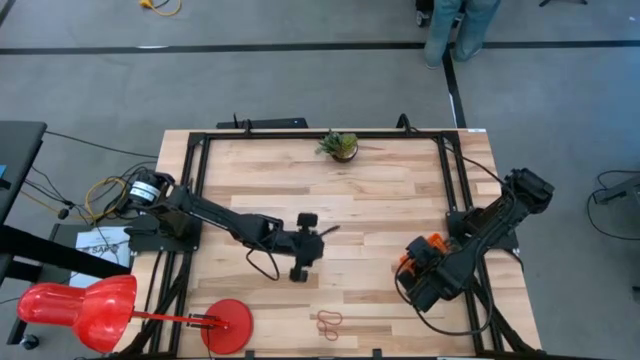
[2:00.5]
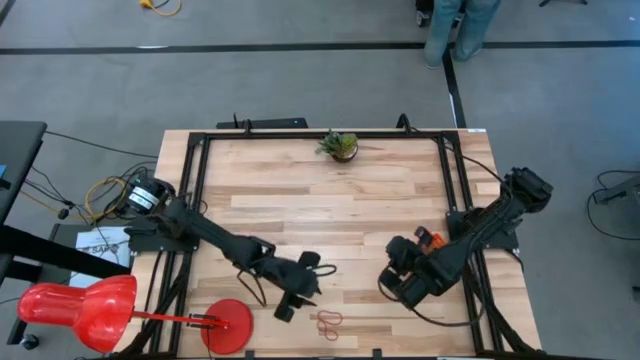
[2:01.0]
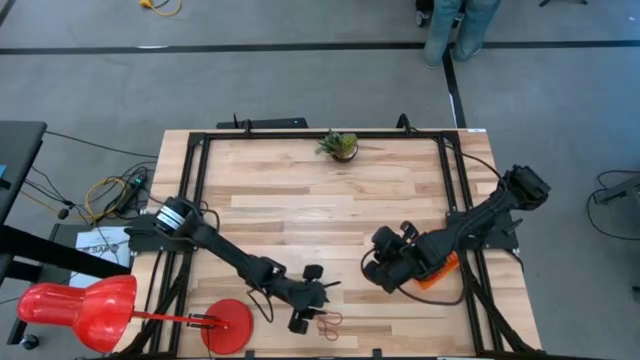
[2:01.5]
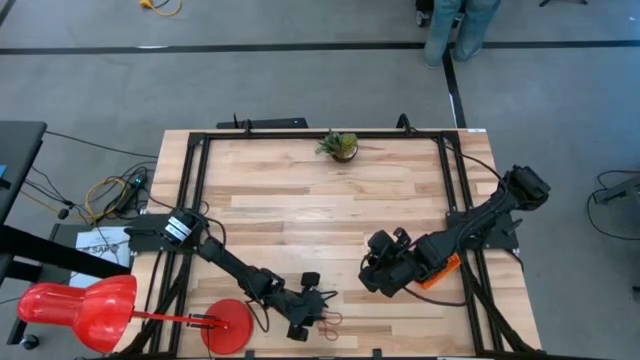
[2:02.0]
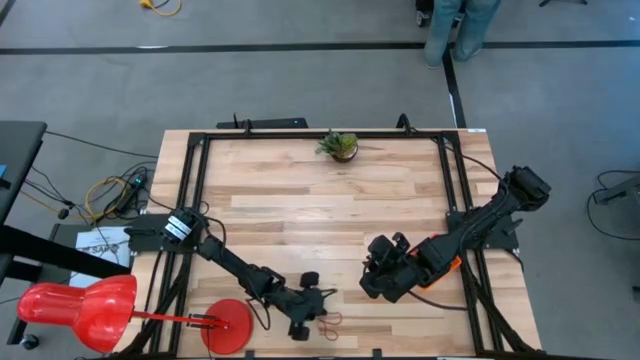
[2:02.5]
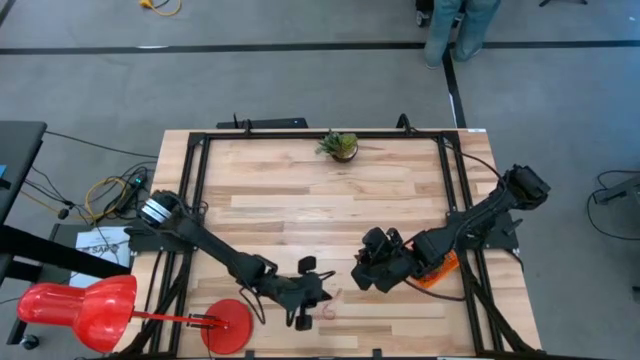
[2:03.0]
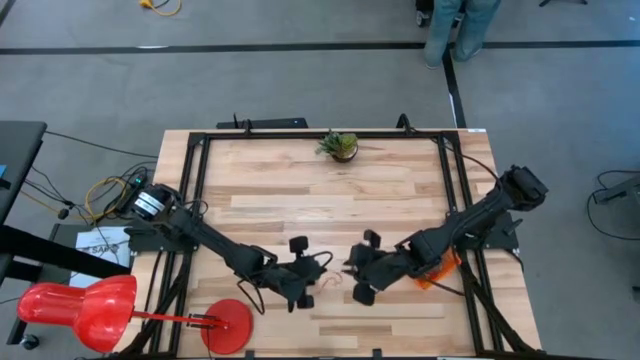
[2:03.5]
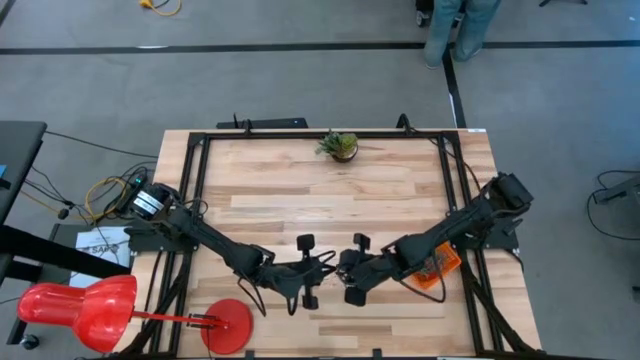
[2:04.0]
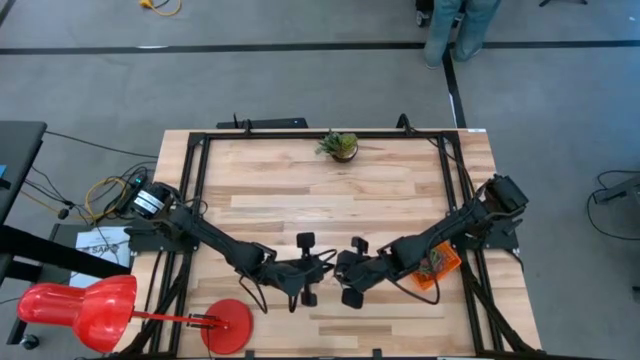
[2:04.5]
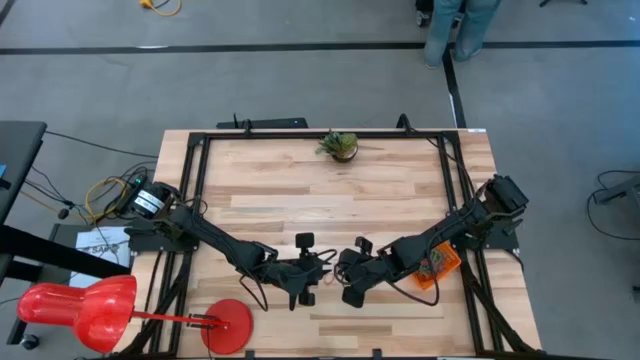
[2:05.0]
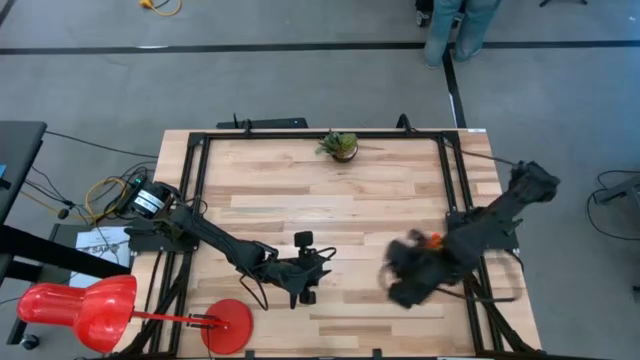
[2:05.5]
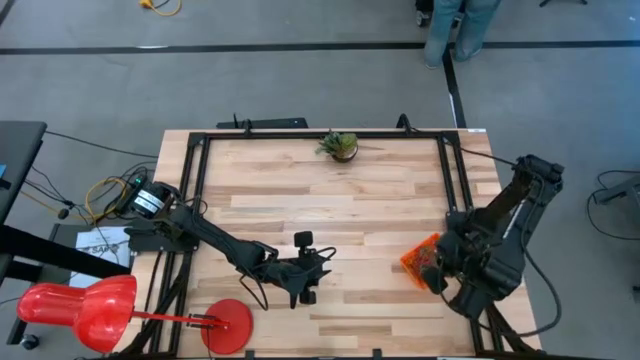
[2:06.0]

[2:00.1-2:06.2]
Task: Pick and place rubber bands into bin
Put the red rubber band into the orange basket

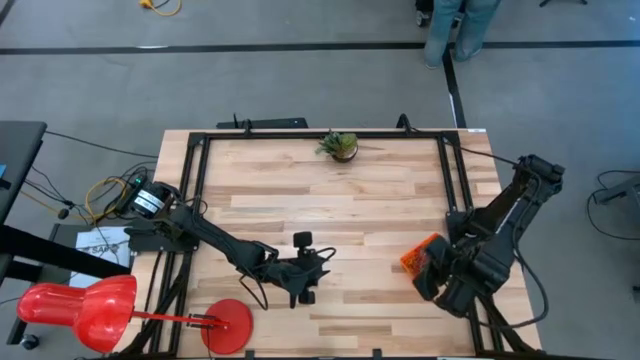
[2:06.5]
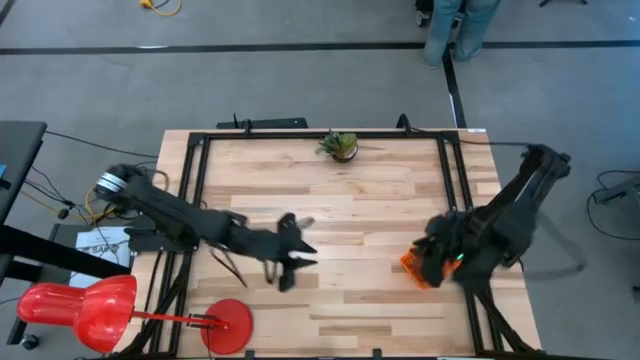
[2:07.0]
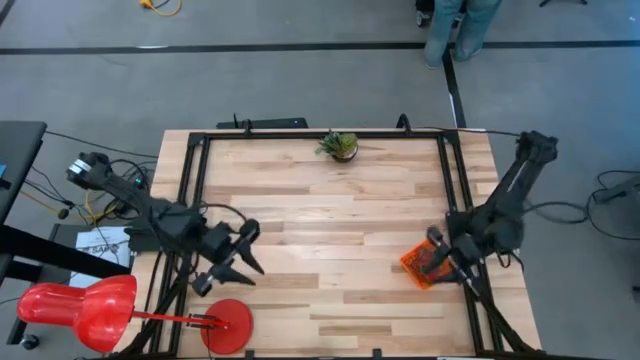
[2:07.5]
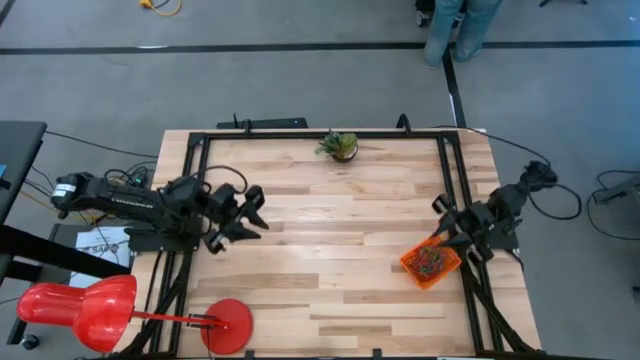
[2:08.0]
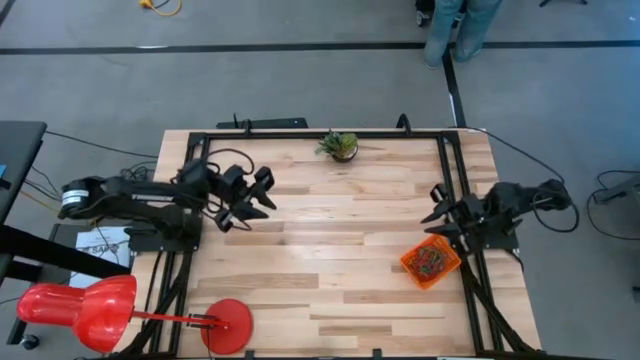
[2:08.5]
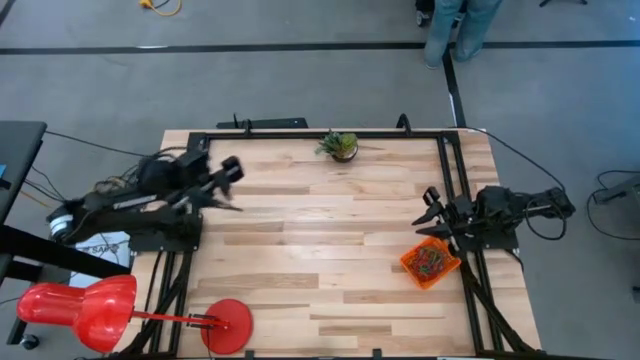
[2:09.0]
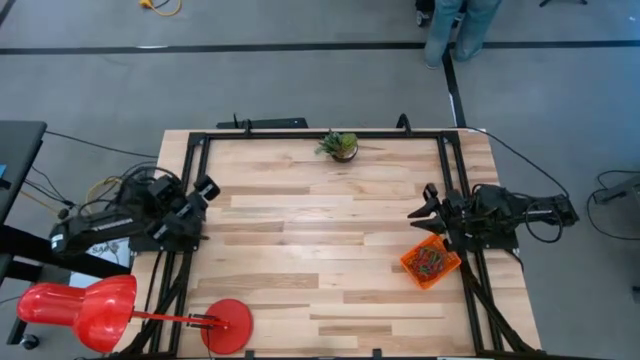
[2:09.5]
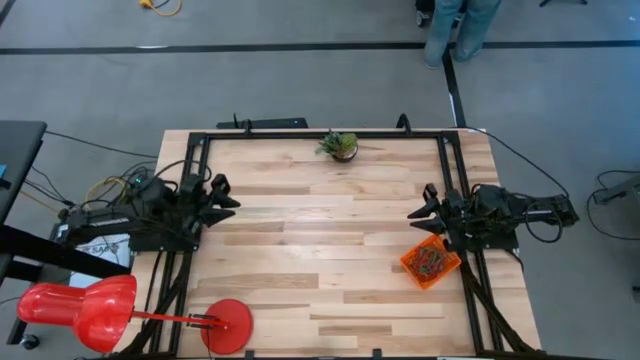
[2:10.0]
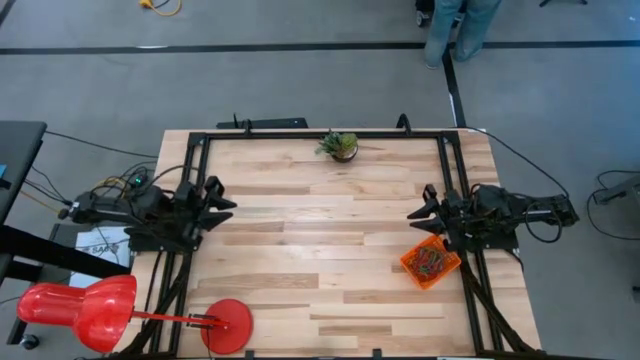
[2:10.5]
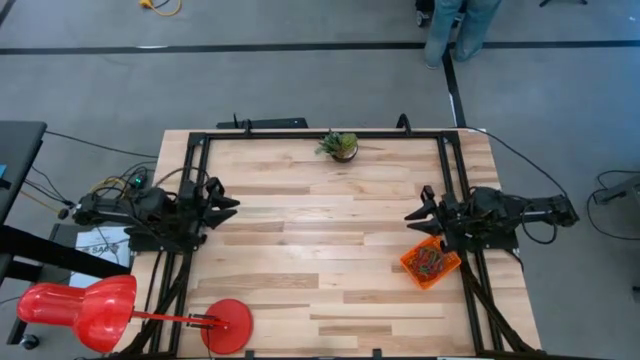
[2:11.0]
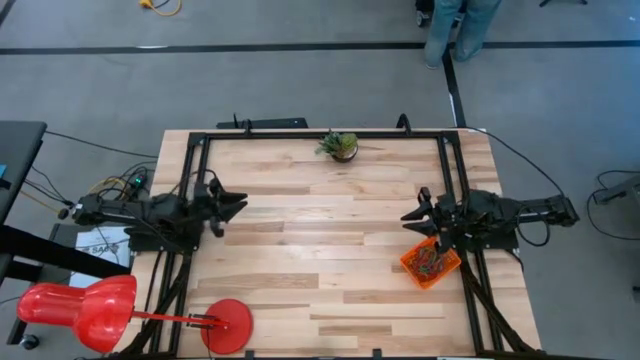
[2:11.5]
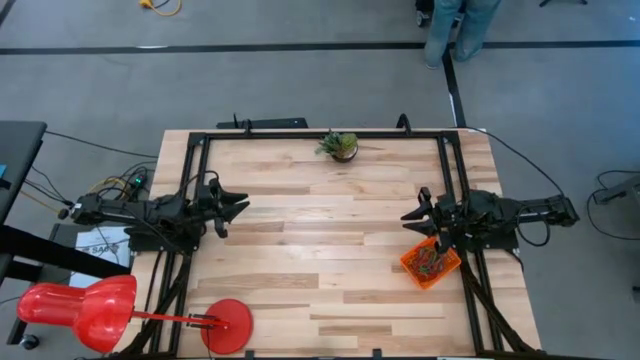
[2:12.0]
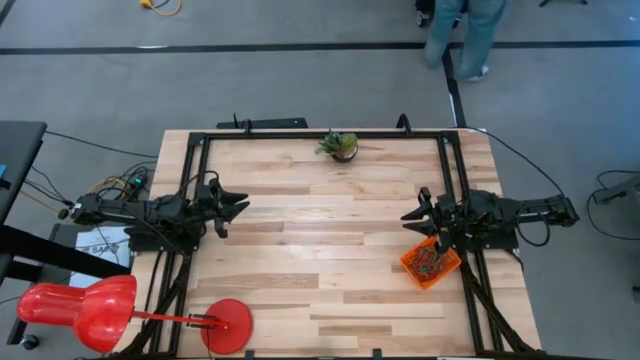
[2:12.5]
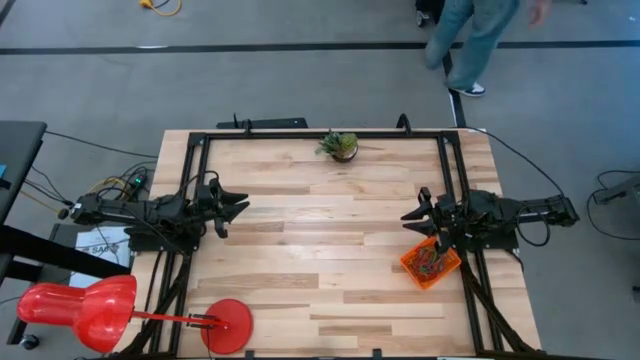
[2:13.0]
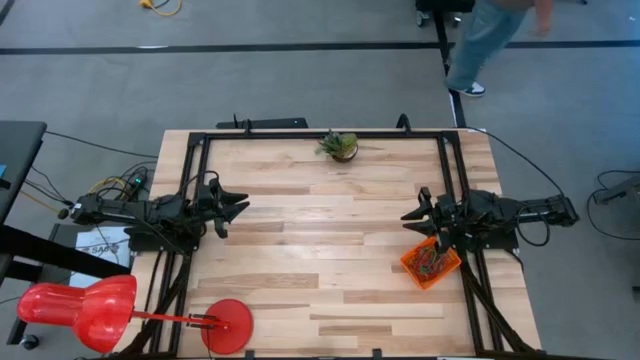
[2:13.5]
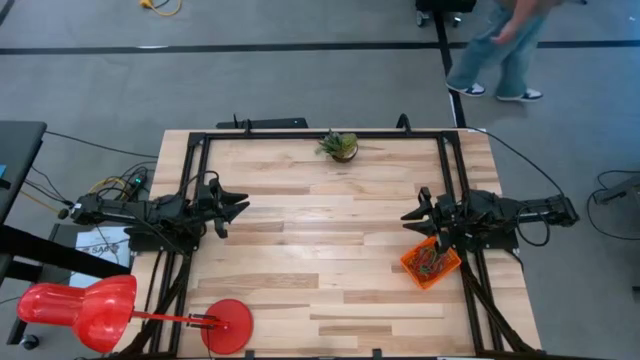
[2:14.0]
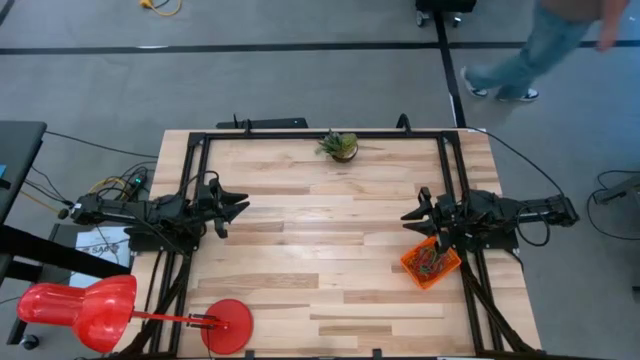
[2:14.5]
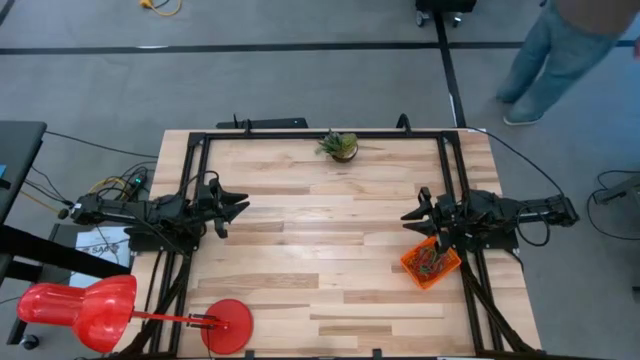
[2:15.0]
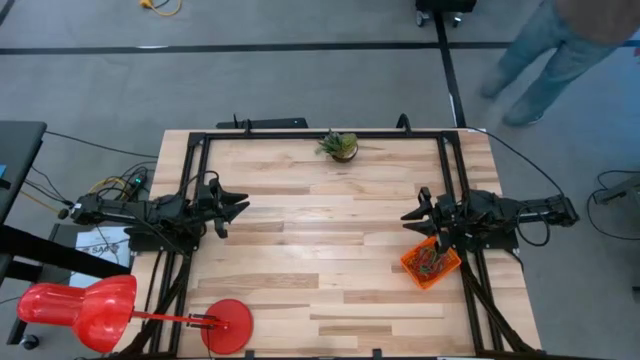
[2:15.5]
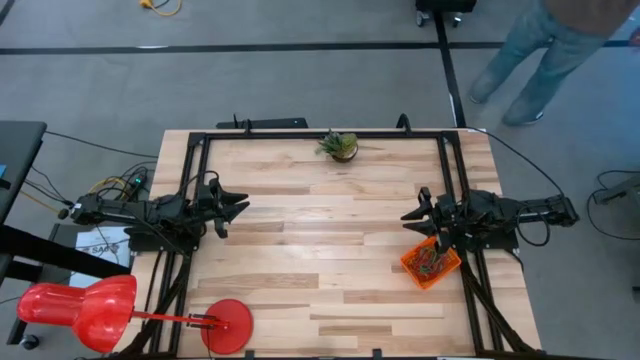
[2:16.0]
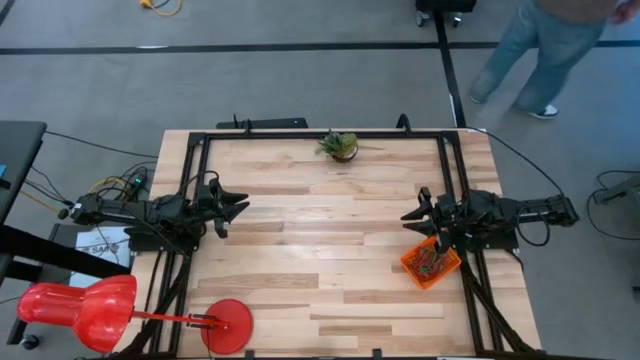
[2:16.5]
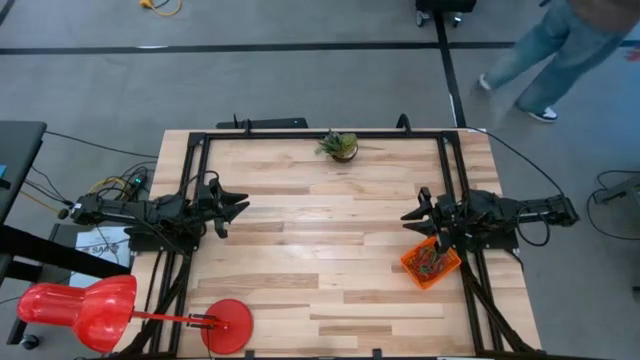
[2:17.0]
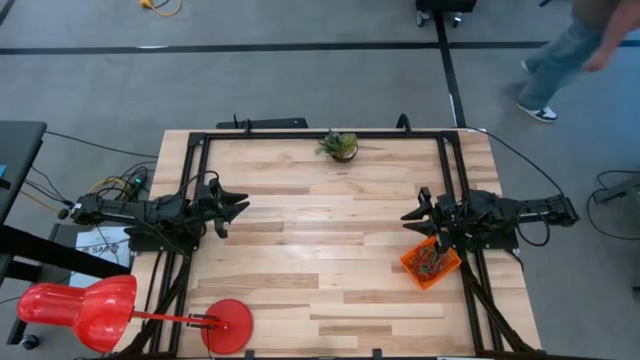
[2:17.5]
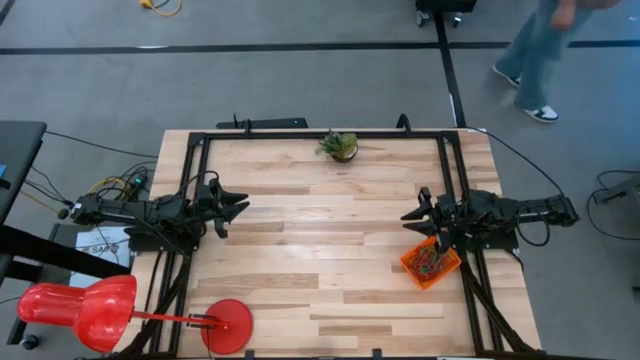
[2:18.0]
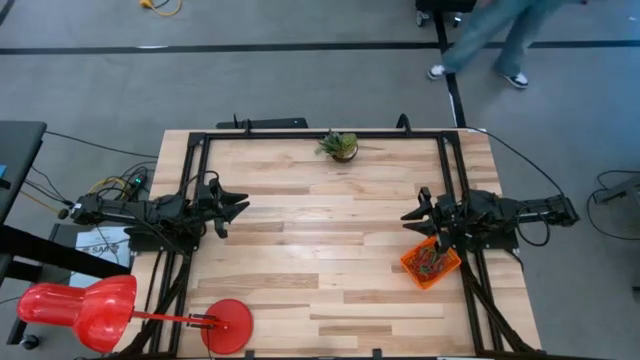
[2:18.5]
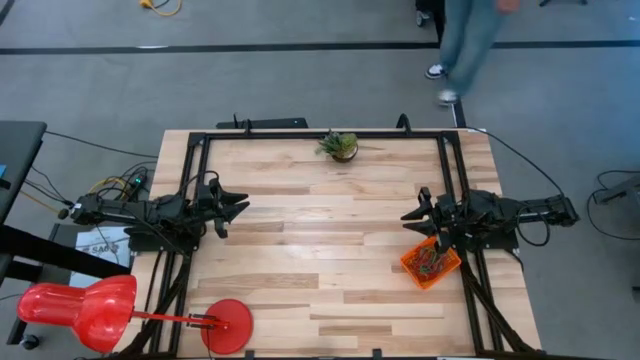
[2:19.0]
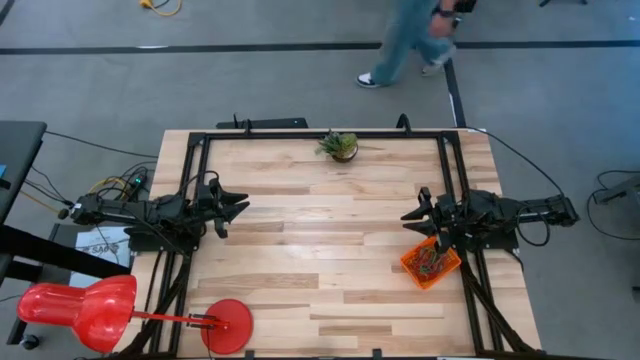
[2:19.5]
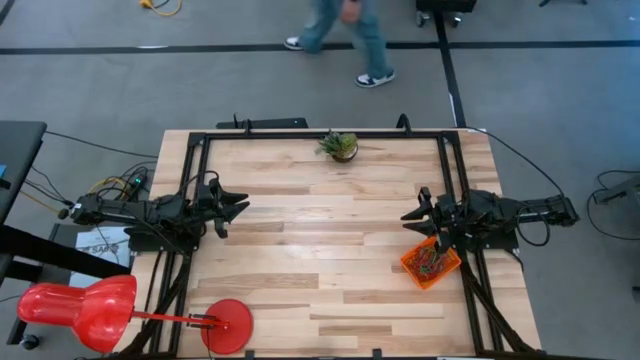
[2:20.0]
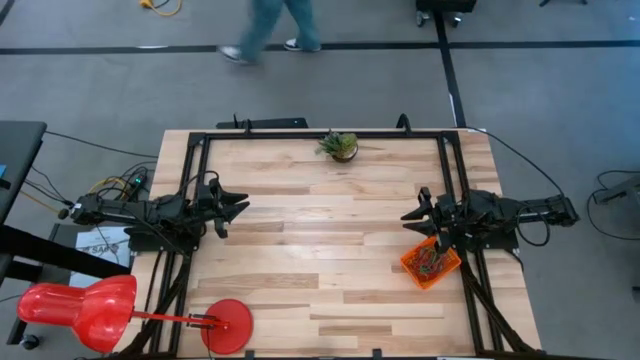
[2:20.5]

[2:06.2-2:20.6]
Return to Home Position

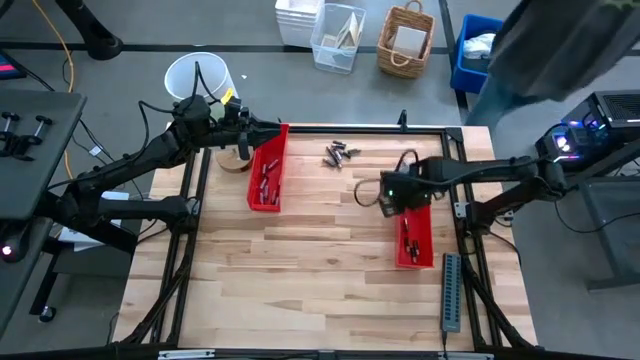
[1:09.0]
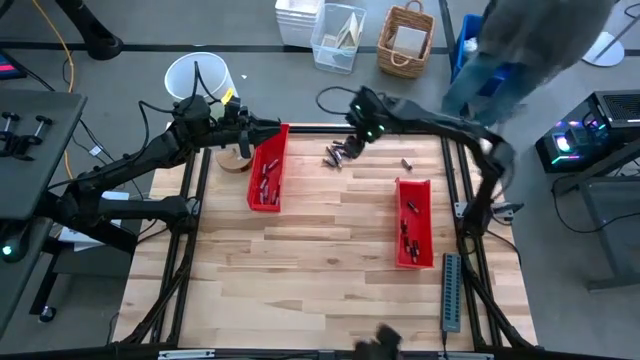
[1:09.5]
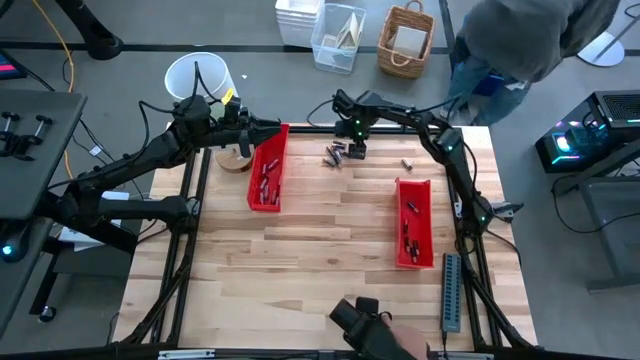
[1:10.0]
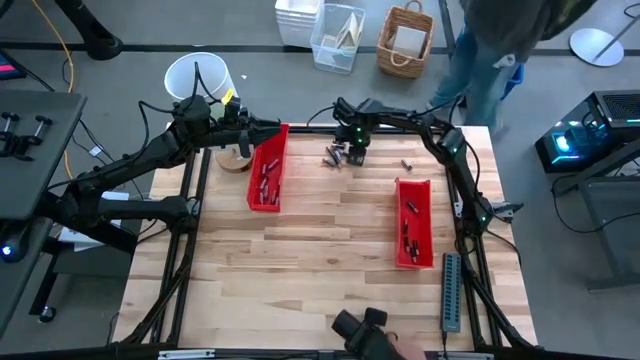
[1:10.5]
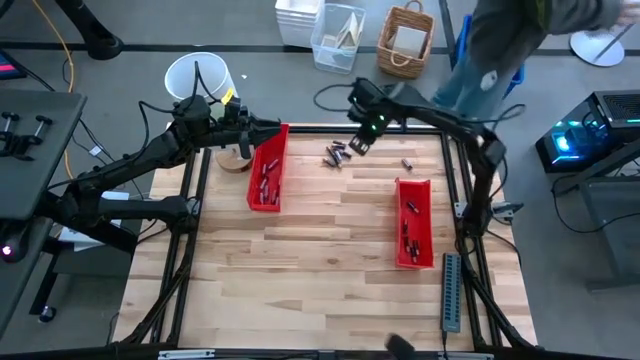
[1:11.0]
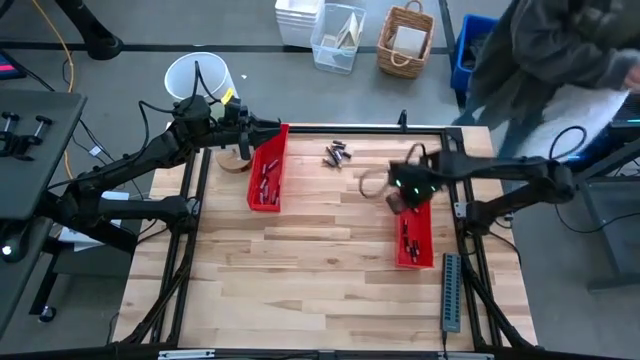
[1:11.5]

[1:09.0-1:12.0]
Task: Sort batteries
Put the black battery into the bottom red bin
